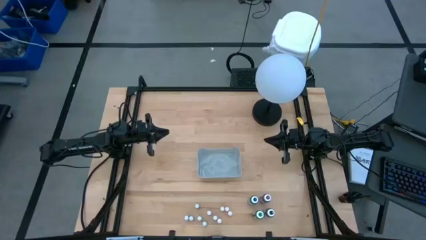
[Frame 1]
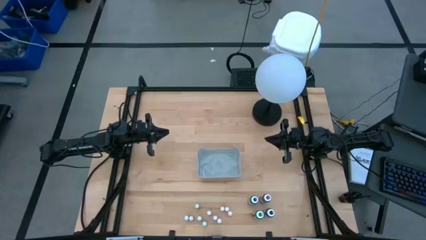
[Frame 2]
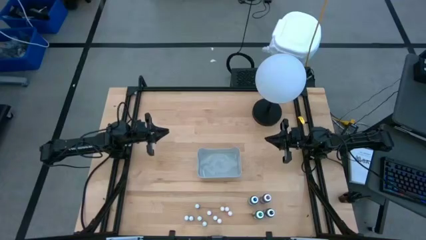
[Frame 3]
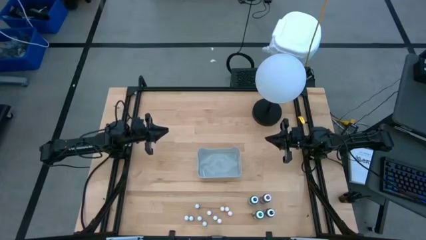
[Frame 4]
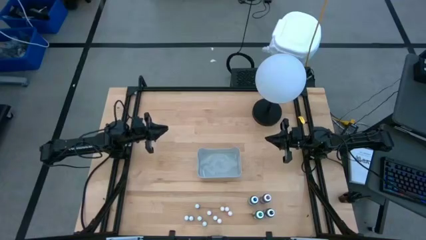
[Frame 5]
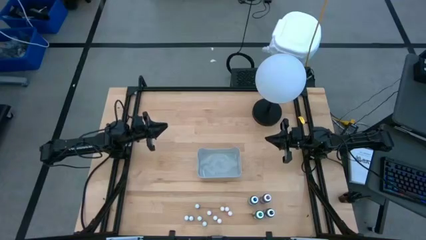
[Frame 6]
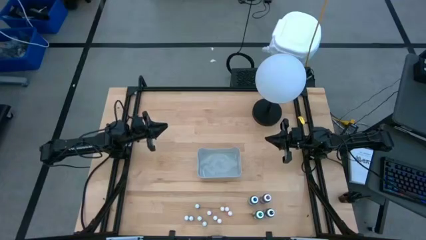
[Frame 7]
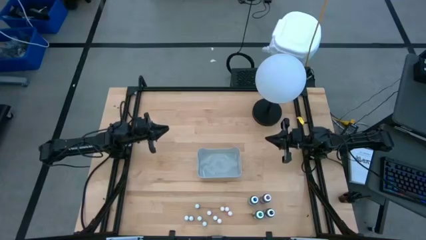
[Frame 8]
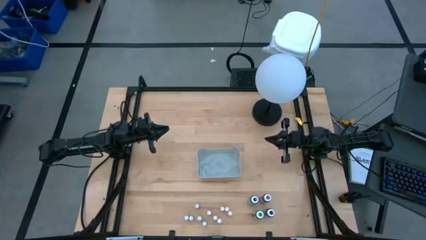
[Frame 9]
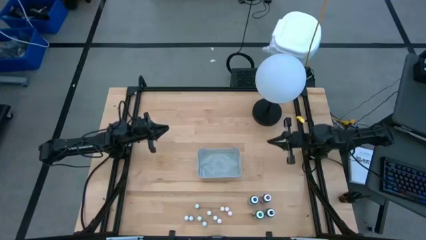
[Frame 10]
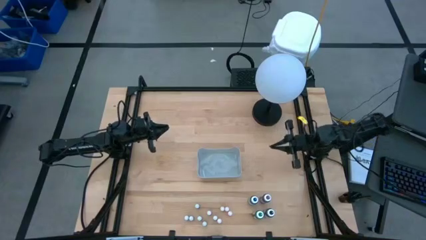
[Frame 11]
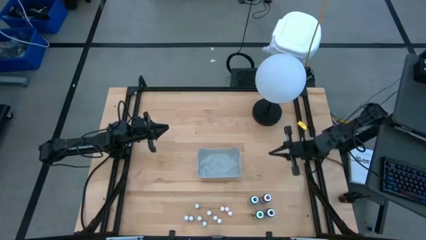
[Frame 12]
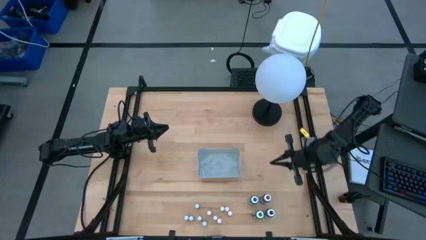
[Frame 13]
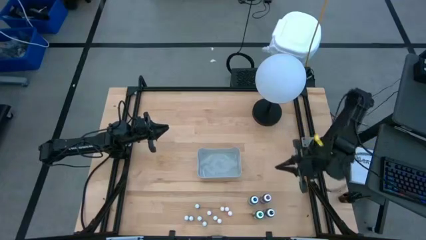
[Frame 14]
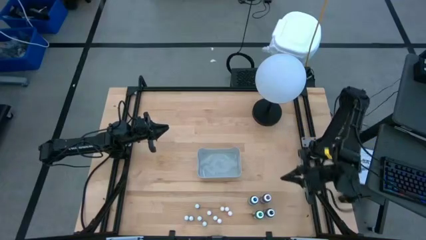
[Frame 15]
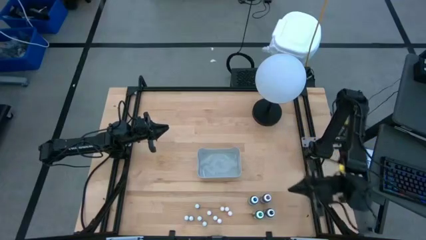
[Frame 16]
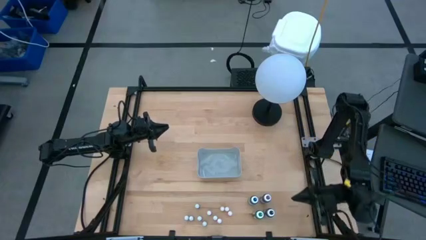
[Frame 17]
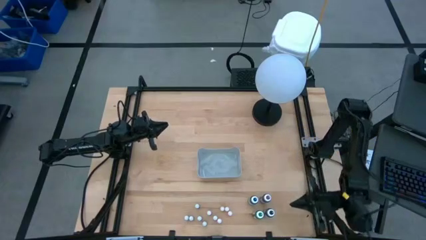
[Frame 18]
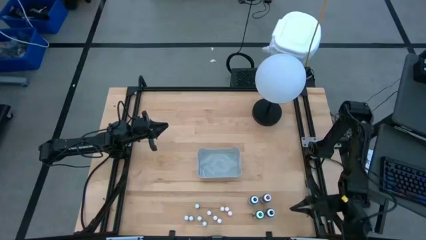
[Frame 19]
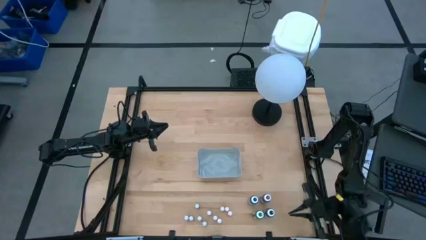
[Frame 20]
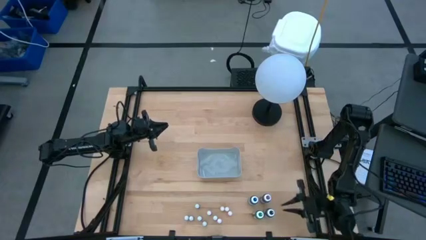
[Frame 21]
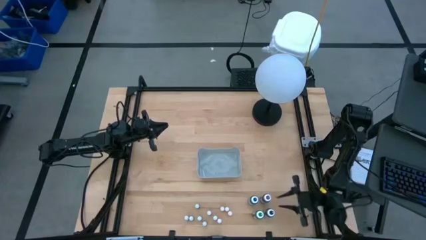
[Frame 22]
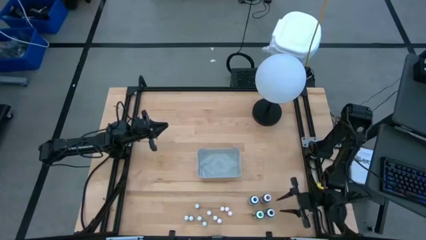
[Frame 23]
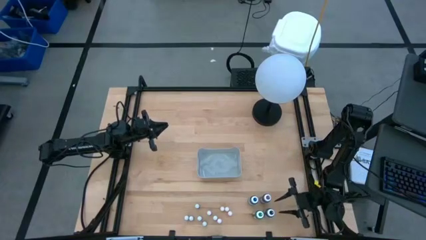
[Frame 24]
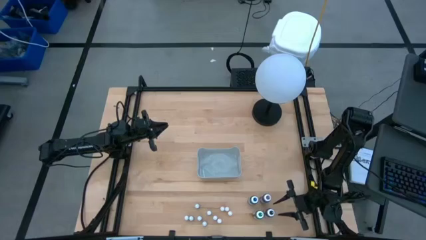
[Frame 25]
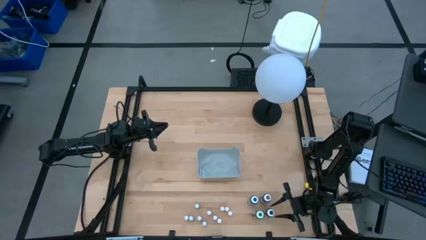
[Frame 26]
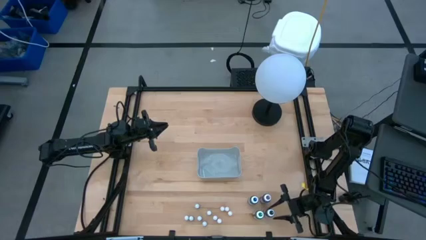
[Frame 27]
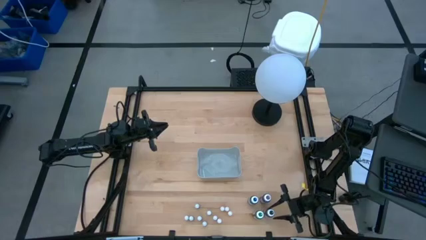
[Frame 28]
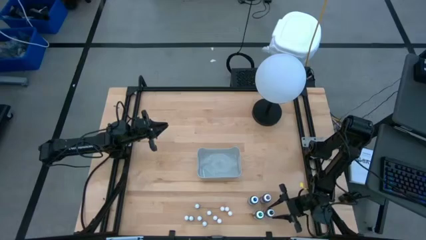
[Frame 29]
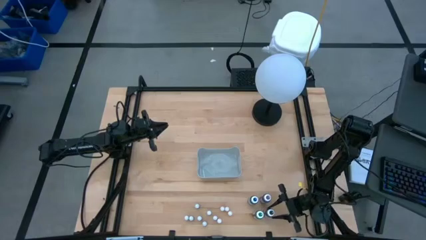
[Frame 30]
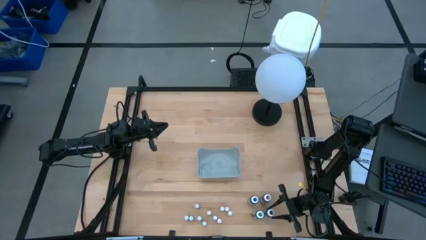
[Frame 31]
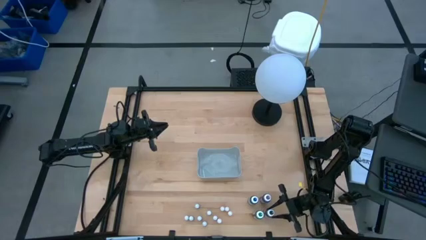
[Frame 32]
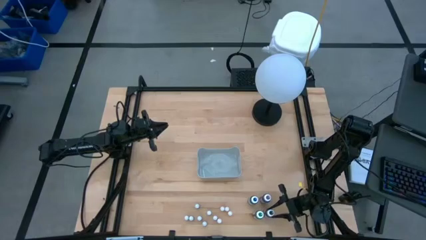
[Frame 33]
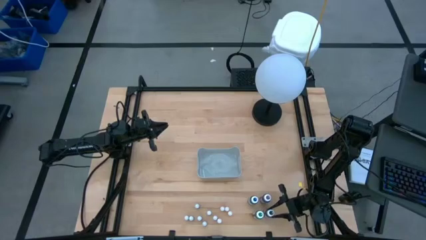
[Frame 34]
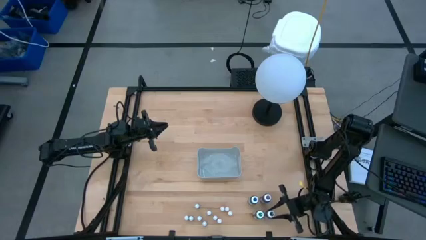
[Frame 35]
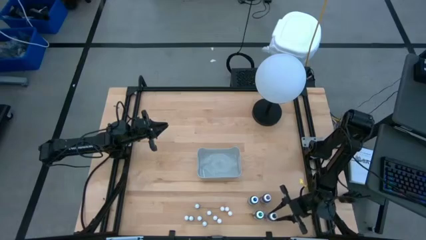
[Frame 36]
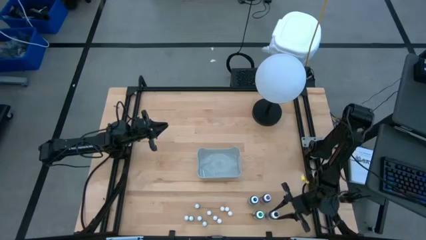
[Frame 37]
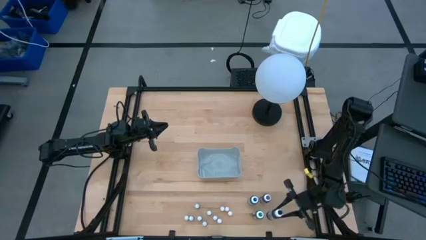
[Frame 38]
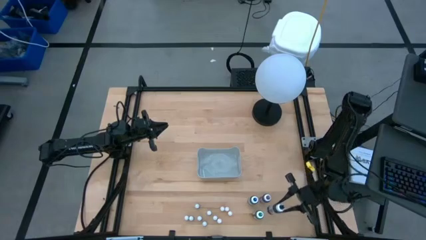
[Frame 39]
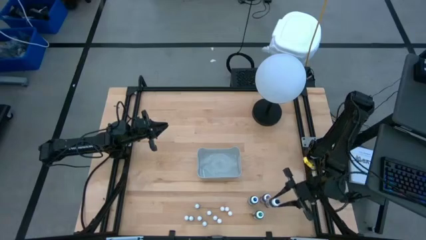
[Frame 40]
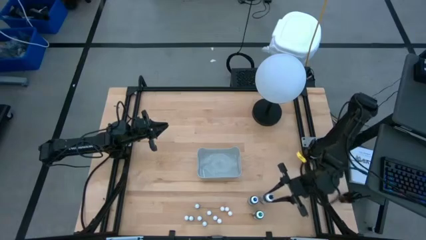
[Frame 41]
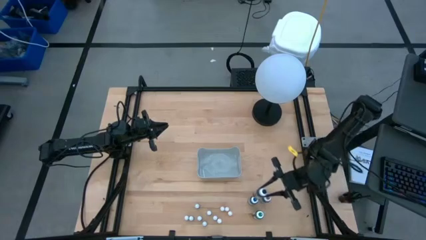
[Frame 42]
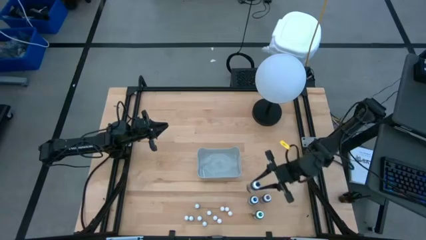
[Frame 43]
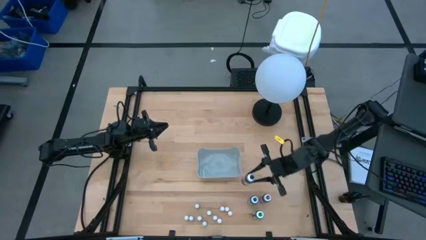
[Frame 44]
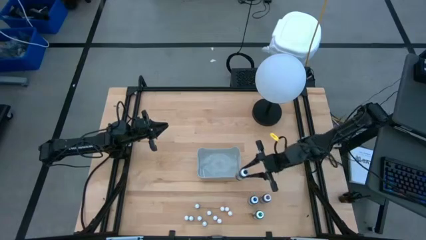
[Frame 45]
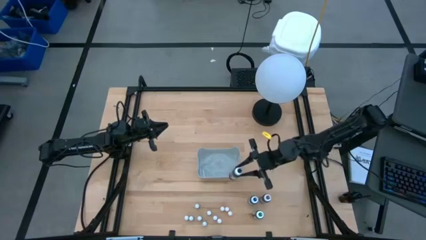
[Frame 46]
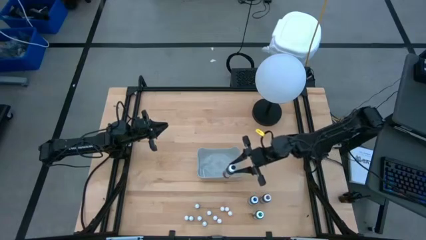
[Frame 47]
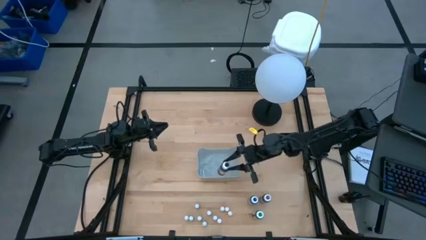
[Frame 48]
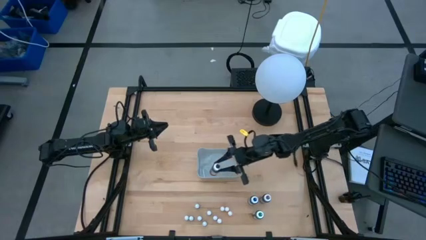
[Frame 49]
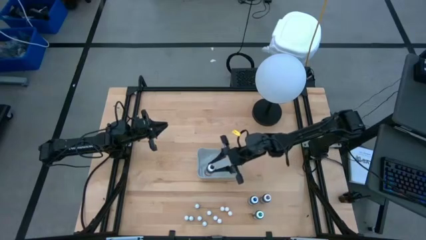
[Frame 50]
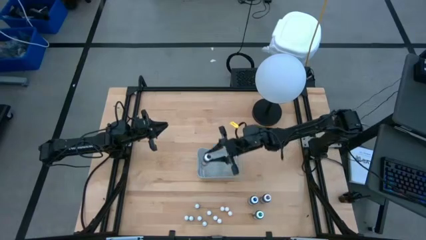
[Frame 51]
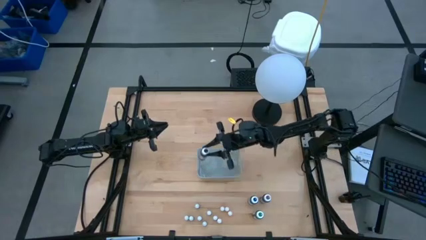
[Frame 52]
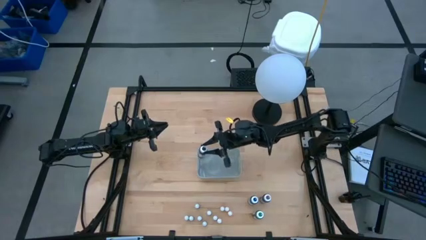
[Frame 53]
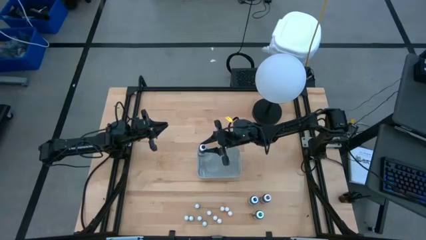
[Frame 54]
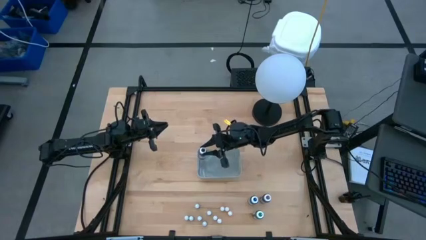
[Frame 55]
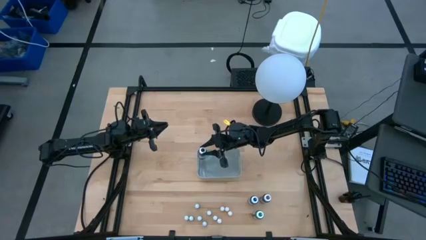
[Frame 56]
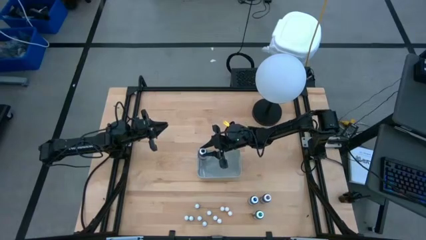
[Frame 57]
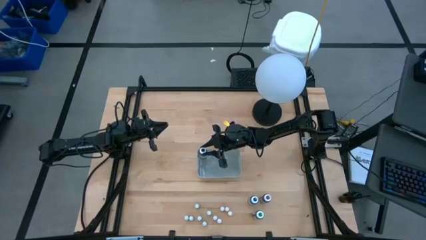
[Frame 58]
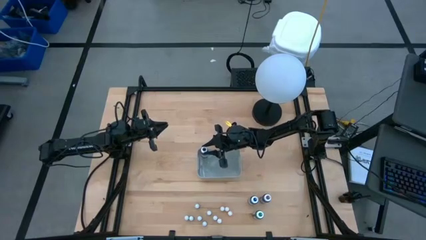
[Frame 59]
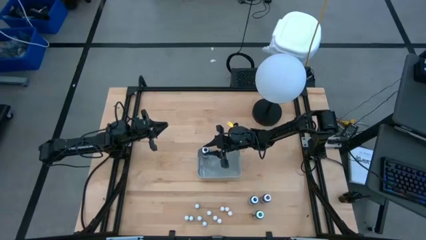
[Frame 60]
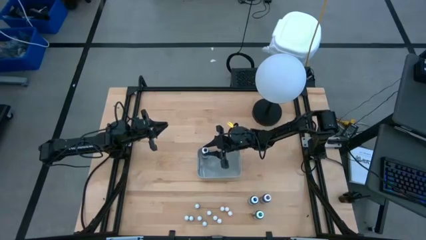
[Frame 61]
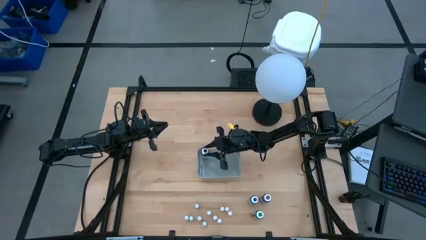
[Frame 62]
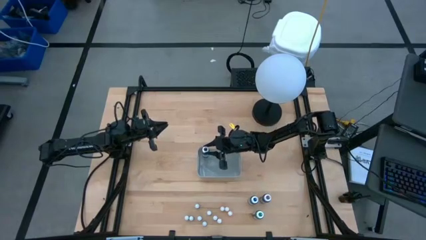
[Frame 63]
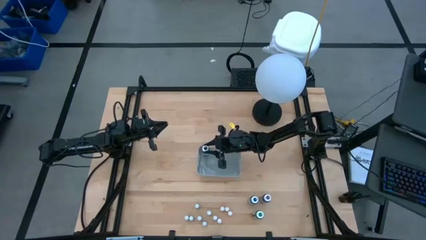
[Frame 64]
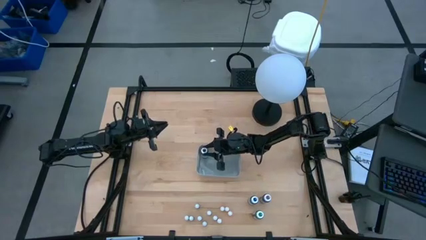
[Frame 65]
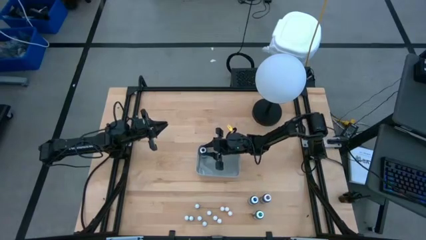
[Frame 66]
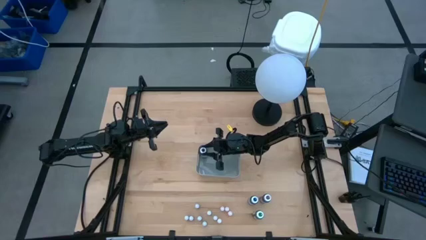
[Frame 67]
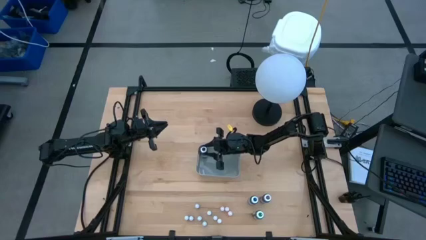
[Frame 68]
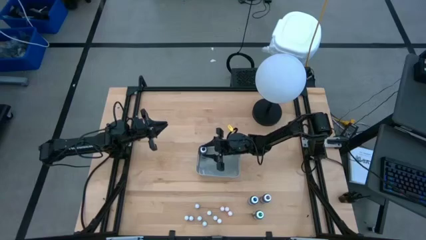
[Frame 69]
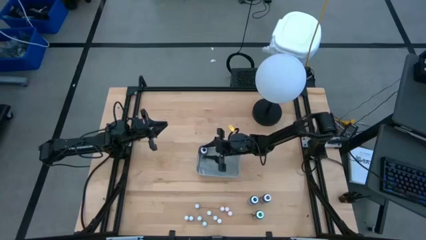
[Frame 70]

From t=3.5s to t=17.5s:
Task: Pick & Place food coloring
Put the large black food coloring bottle into the gray bin
